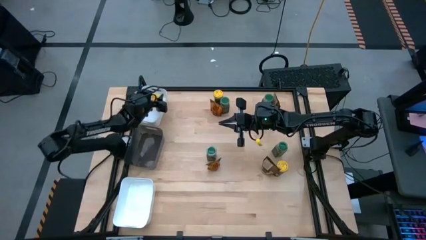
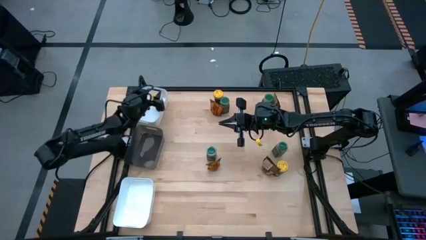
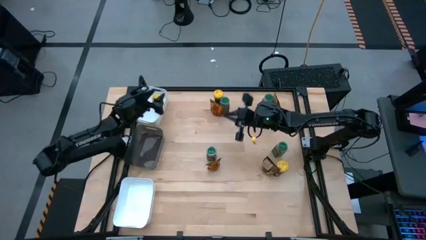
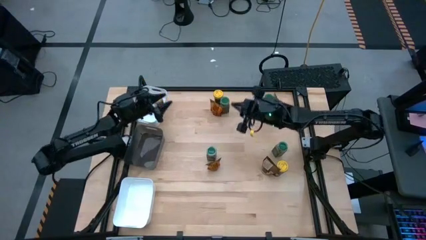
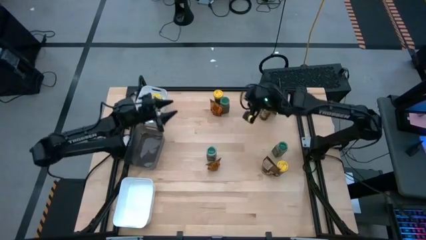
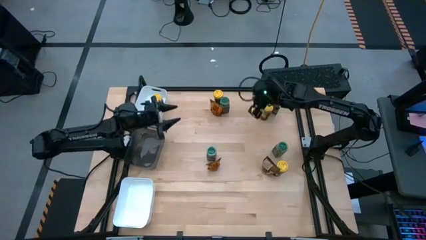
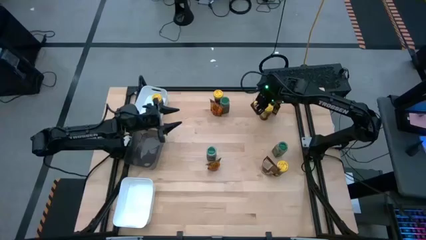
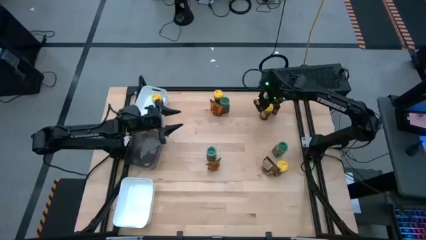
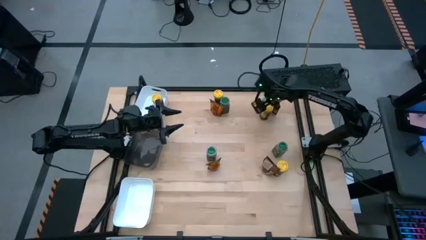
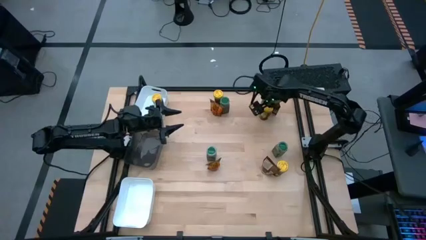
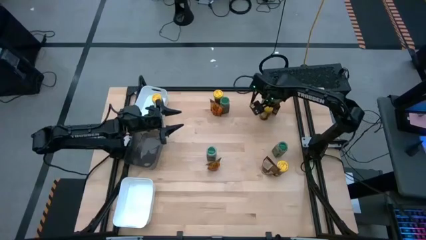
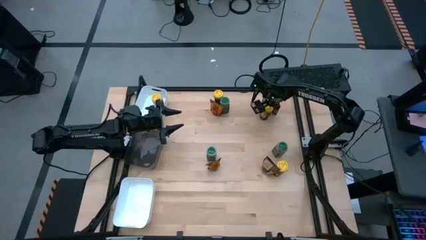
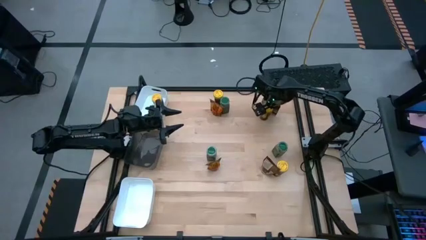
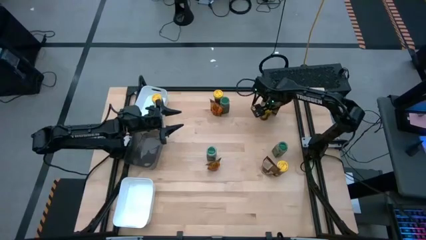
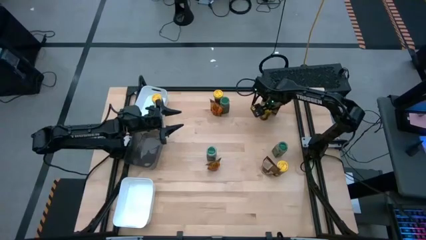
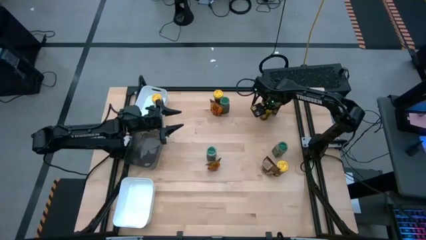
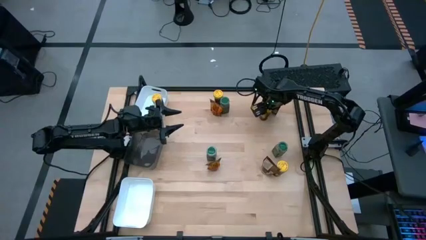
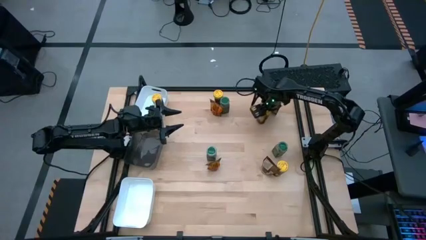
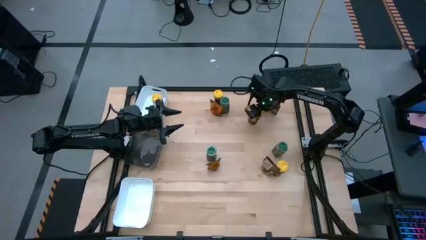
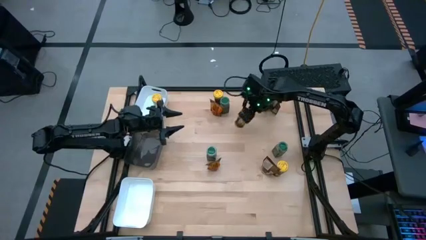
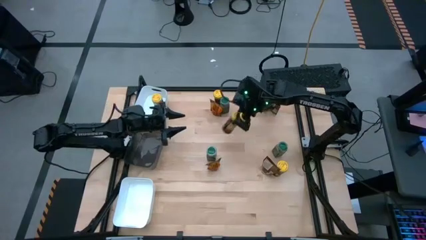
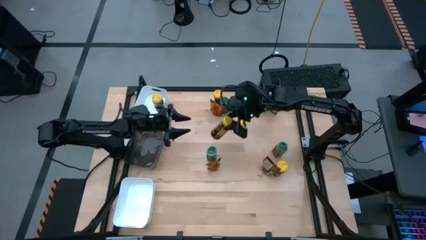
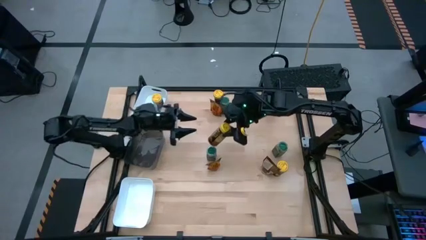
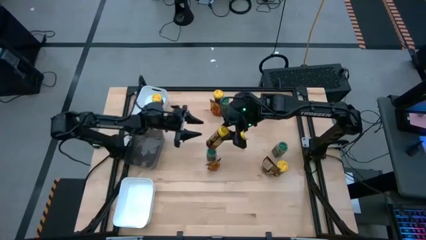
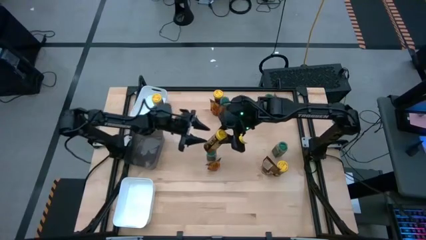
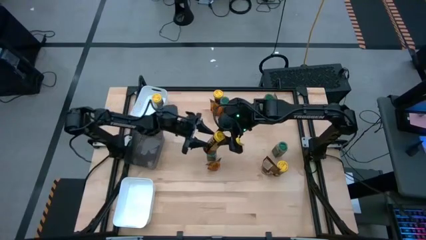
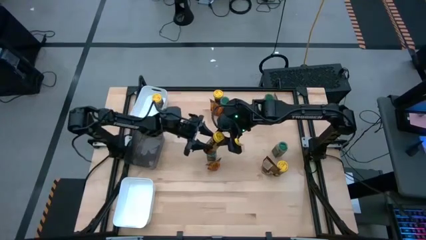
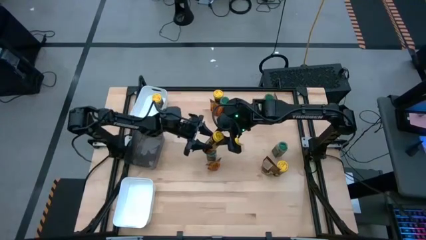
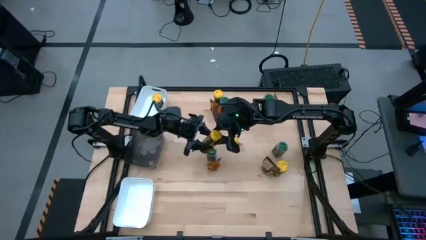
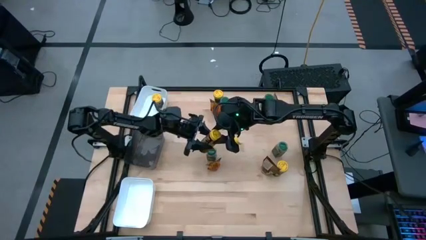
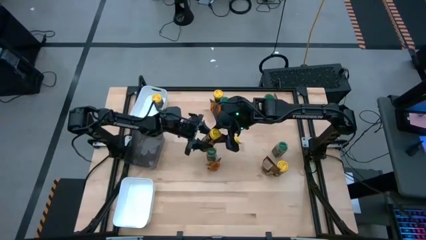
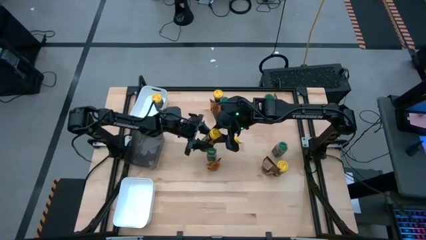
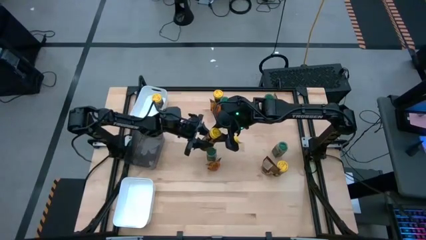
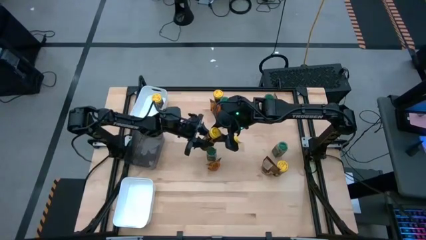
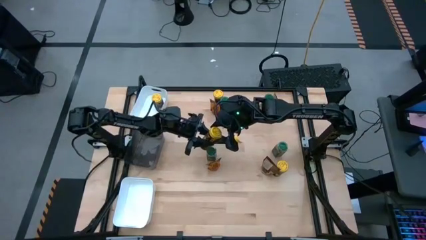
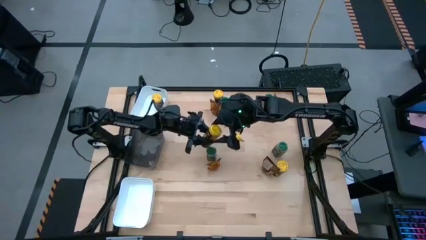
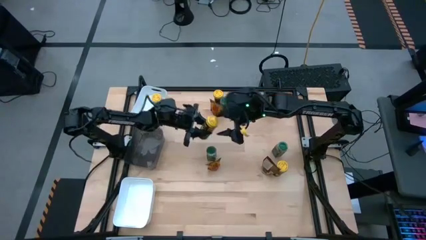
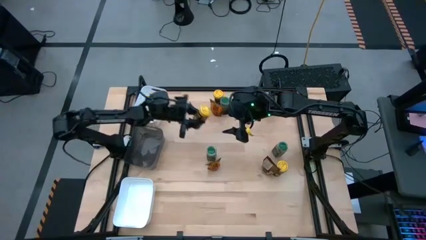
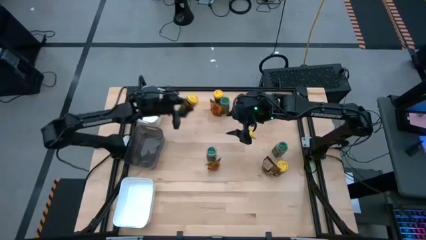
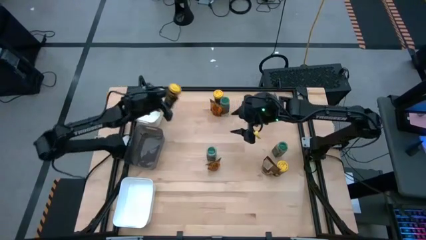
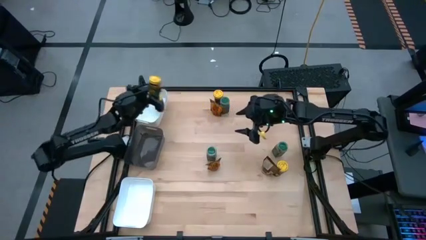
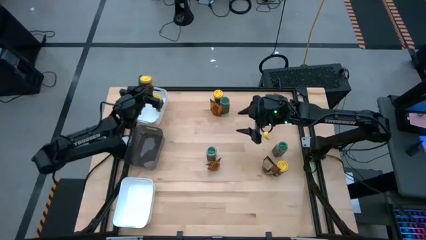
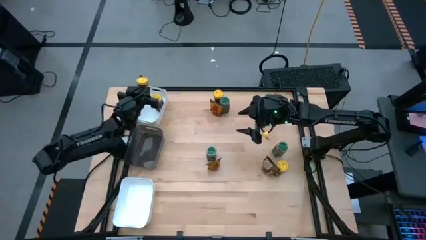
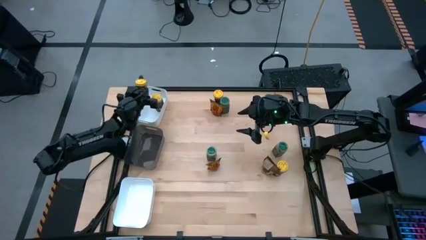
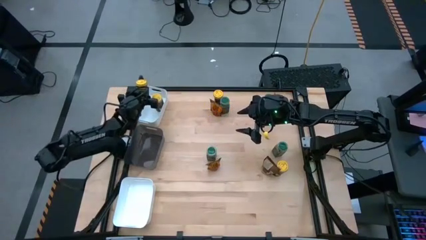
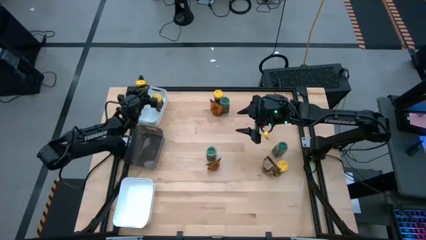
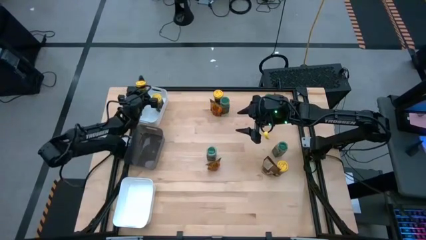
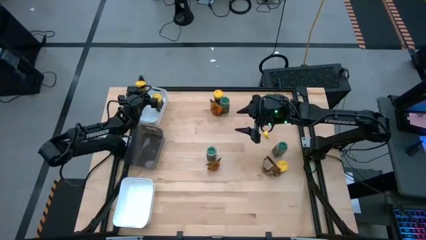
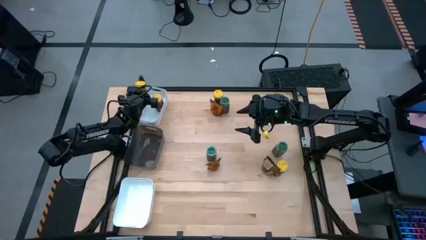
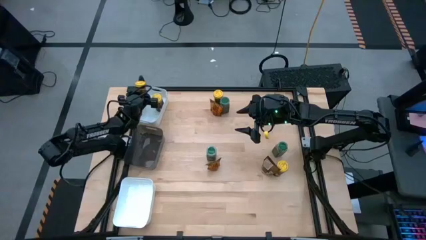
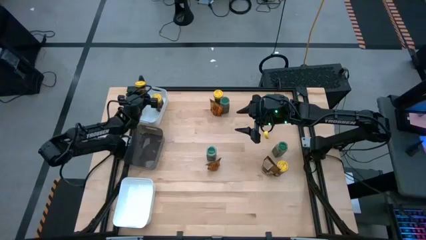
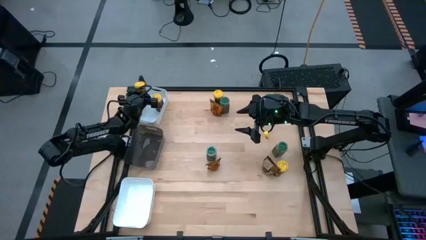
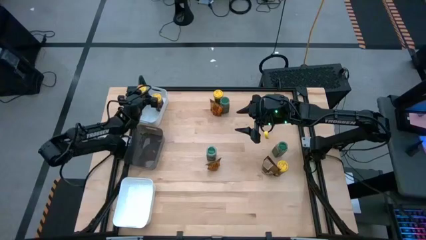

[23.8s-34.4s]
Task: Sort spices by type
Put the top right yellow seasoning bottle into the top white bin
